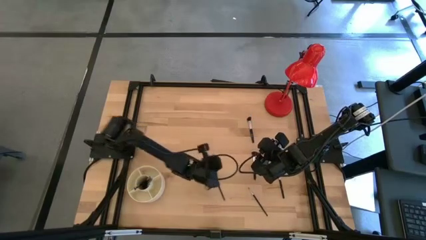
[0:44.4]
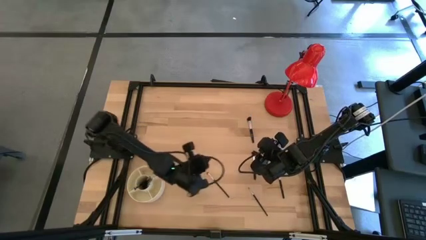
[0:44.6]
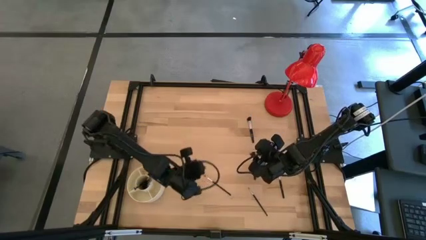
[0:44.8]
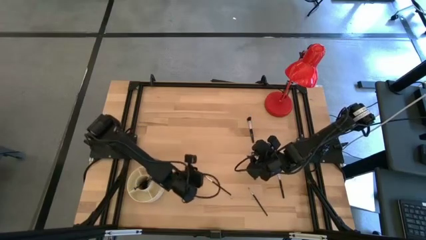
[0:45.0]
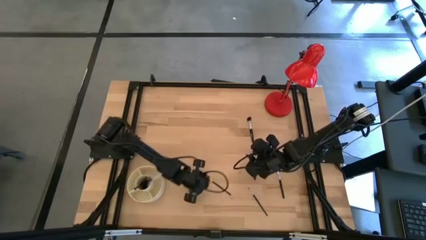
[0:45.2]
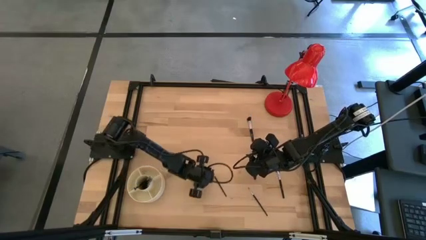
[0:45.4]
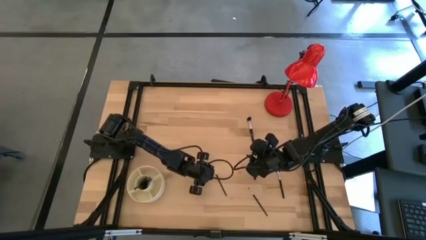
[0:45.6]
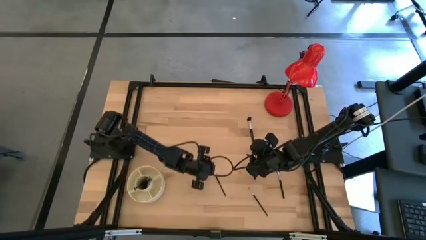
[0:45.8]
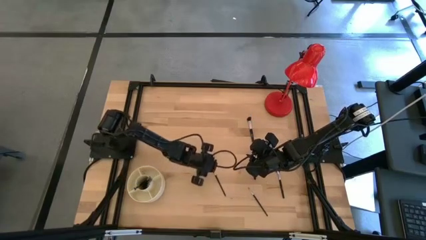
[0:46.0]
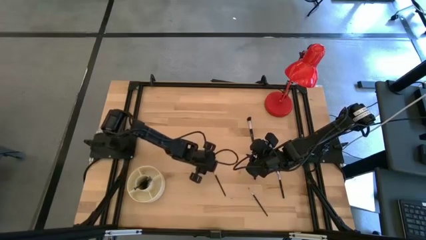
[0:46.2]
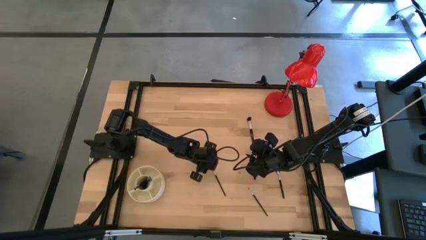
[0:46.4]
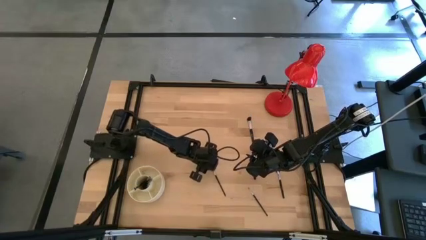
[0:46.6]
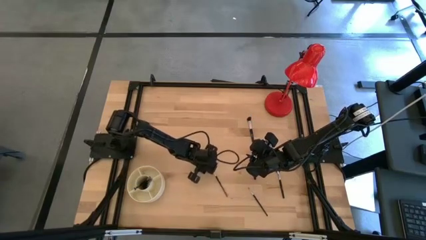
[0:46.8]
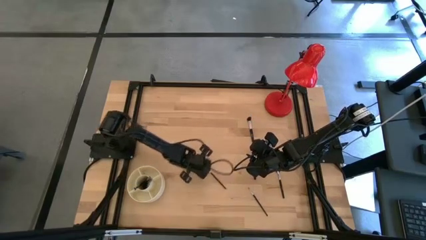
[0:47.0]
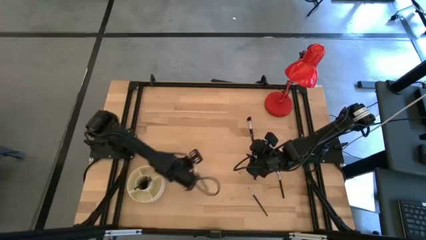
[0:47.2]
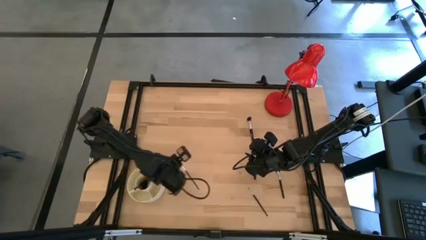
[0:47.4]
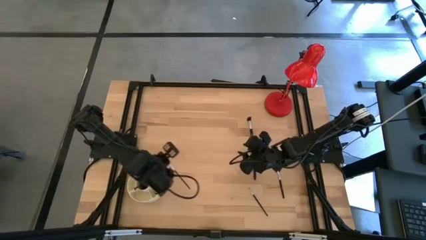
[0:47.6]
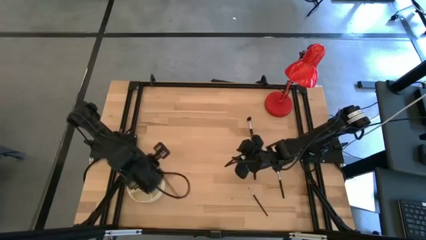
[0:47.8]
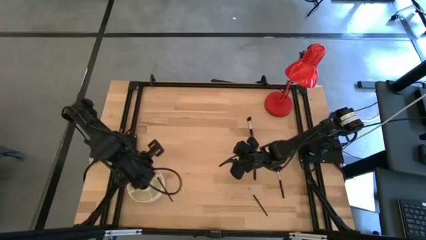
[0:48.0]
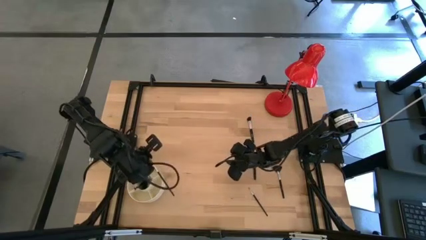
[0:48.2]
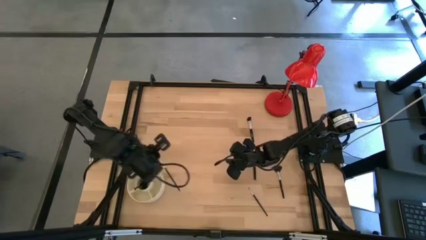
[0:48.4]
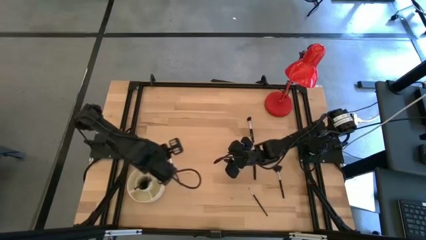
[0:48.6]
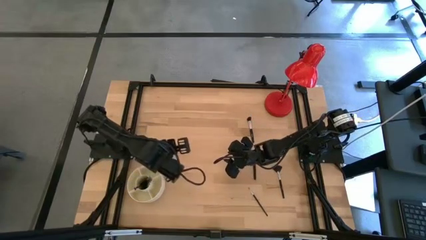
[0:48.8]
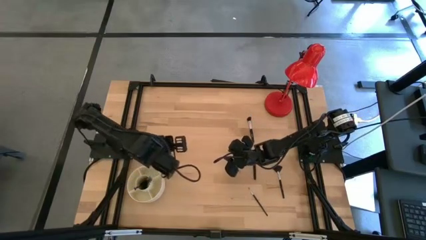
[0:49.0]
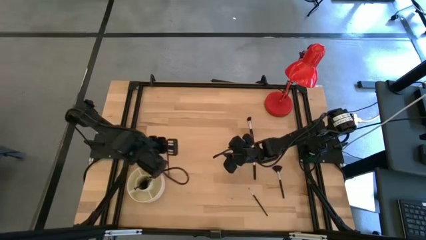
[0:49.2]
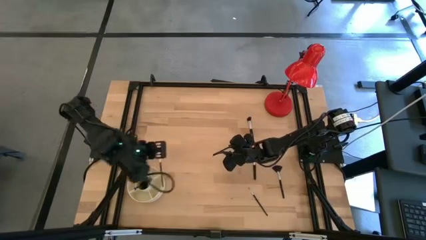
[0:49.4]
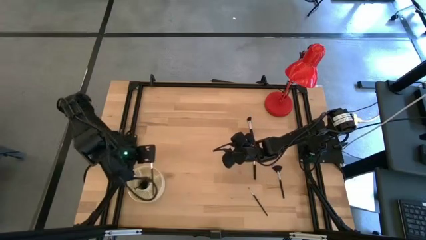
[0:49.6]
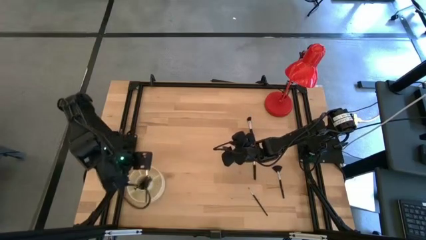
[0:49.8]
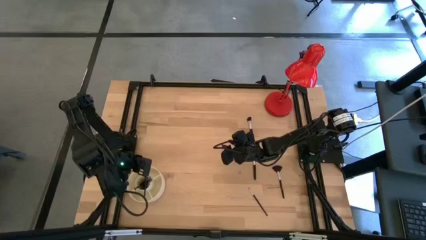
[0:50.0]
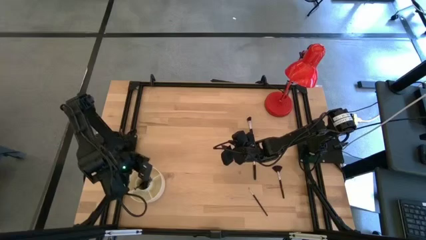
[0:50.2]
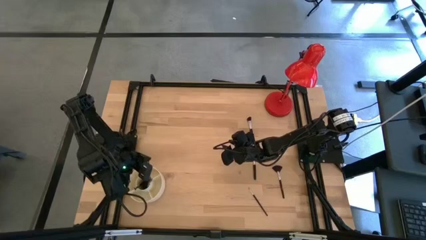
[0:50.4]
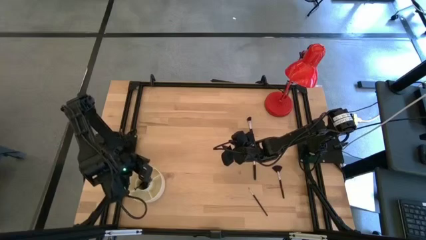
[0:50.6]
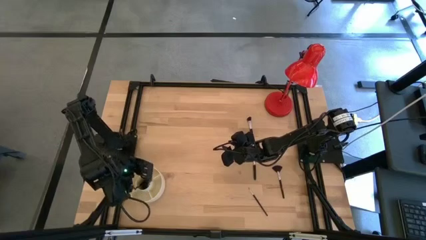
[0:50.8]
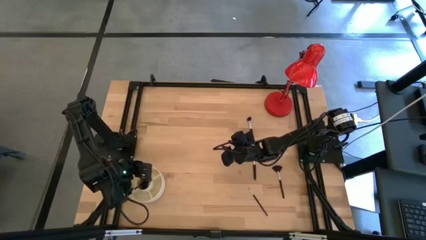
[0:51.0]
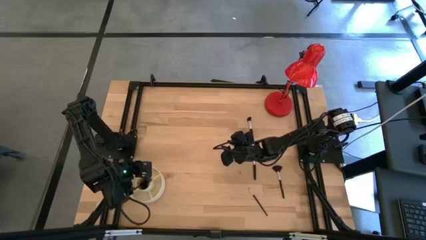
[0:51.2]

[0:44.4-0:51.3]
Task: Put items in baskets/containers
Put the black eyeshadow brush into the white organizer

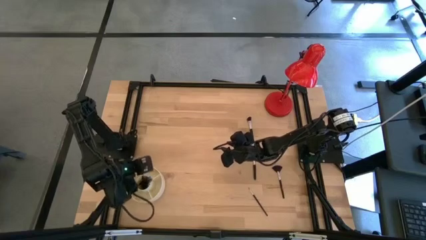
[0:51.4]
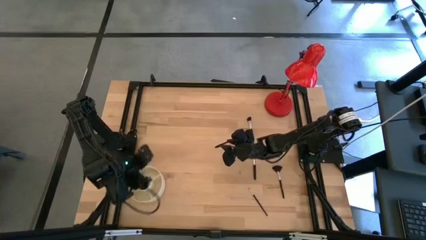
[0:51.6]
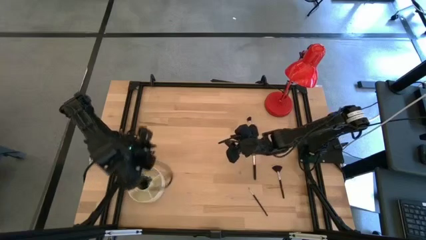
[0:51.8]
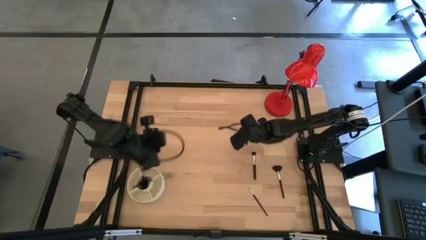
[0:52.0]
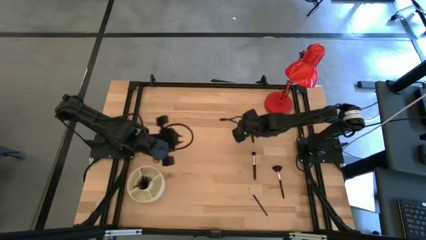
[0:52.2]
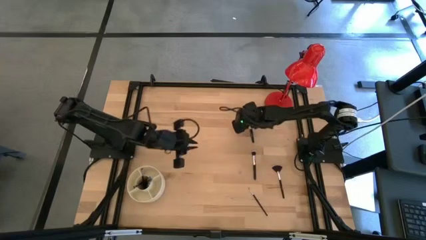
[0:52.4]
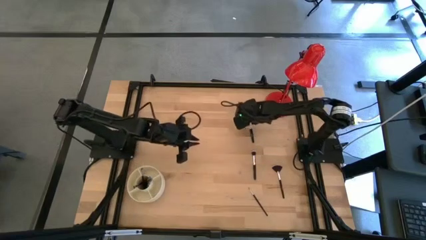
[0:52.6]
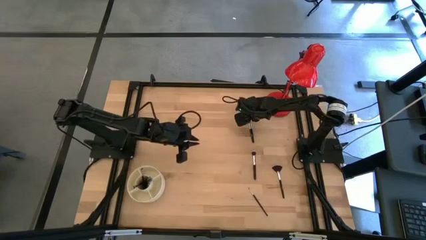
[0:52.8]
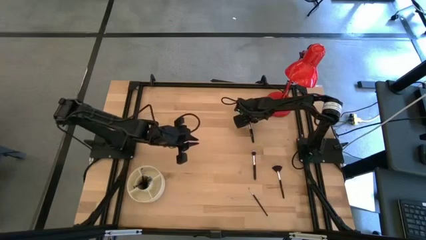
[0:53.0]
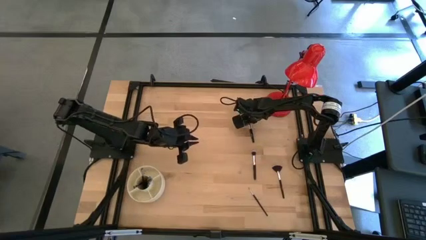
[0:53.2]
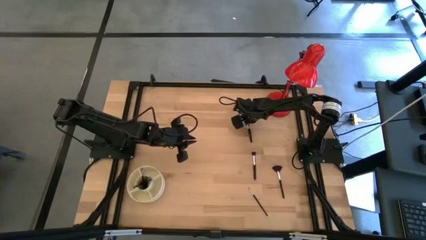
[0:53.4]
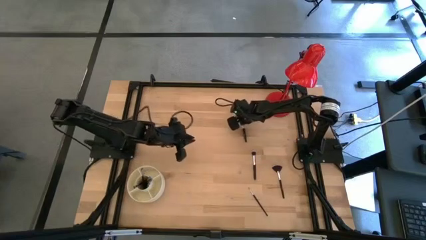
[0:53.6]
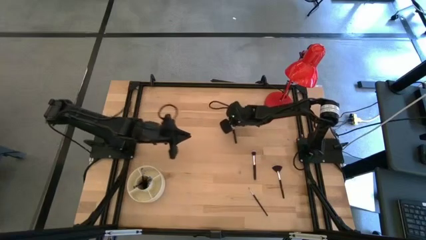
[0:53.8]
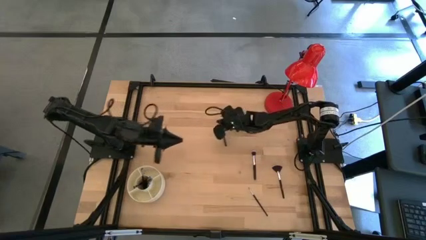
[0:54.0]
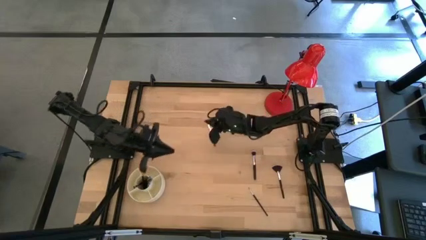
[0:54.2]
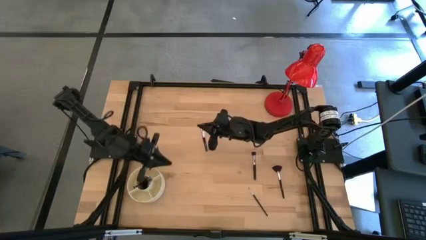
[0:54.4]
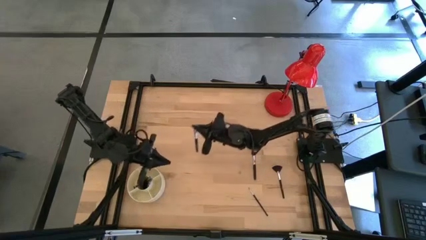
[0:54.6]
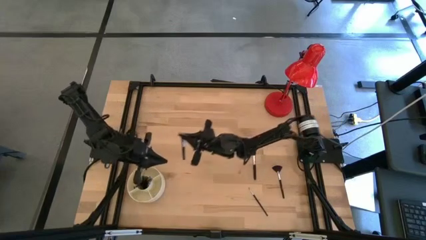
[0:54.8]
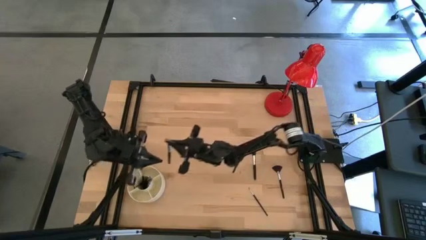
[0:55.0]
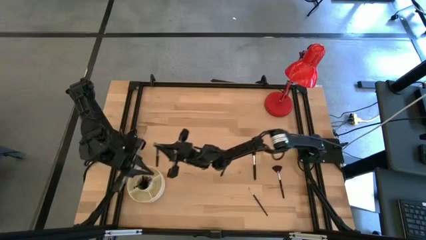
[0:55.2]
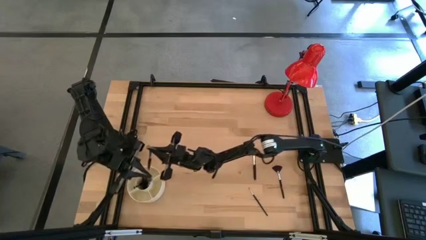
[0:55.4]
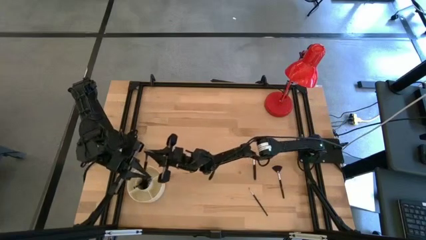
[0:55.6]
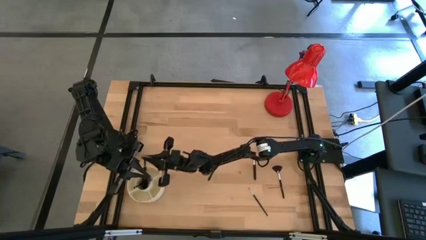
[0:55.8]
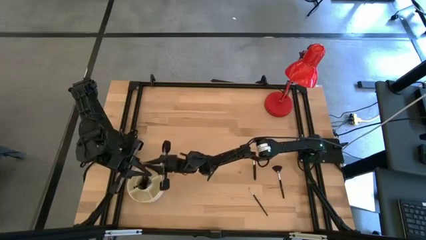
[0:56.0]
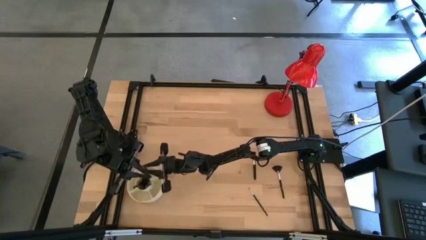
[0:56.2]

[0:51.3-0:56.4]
Put the black powder brush into the white organizer

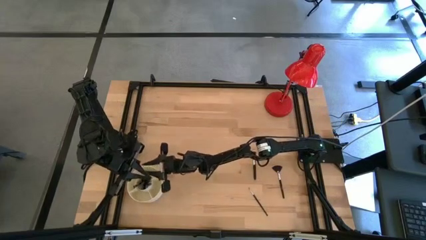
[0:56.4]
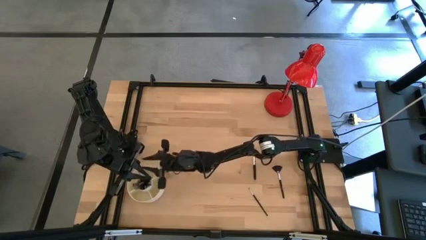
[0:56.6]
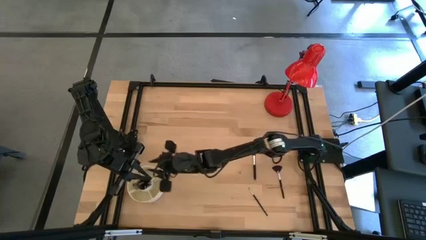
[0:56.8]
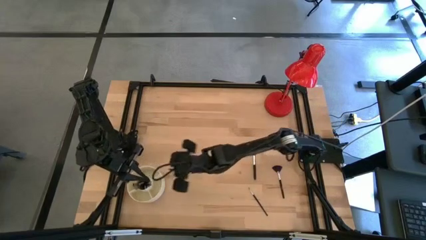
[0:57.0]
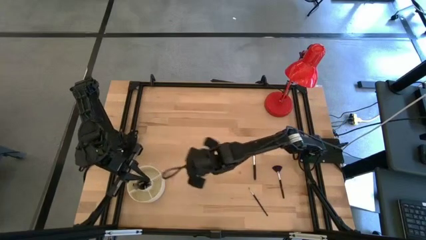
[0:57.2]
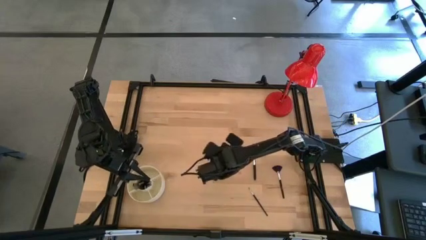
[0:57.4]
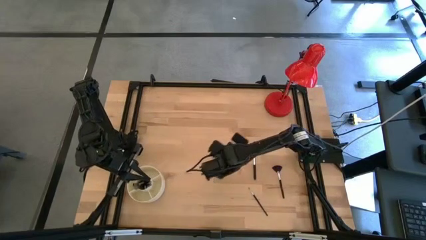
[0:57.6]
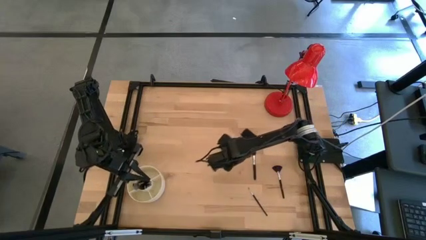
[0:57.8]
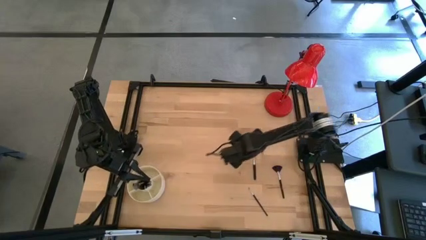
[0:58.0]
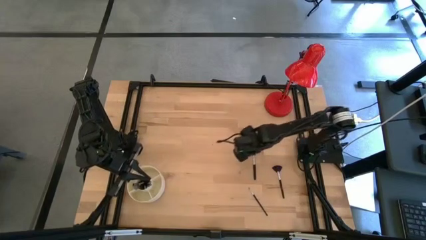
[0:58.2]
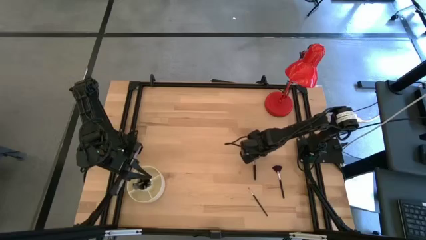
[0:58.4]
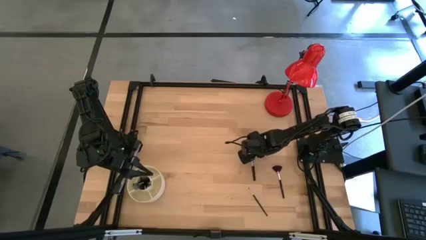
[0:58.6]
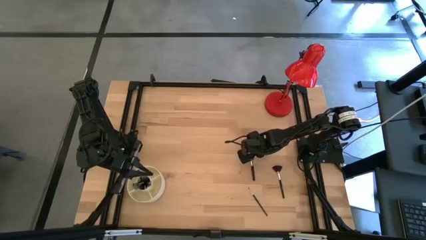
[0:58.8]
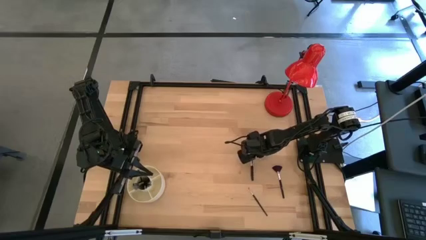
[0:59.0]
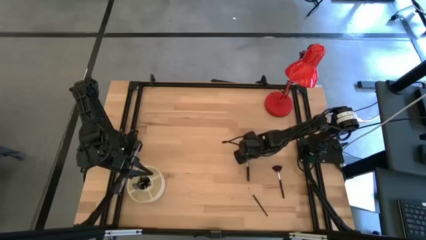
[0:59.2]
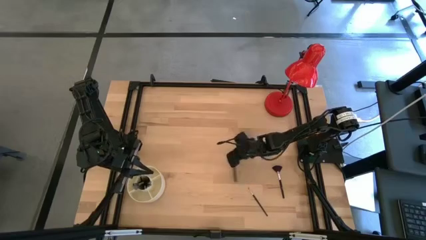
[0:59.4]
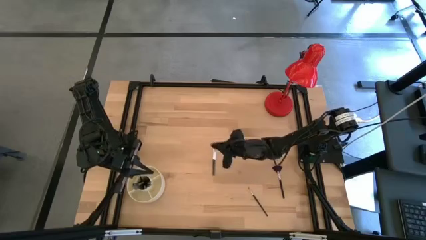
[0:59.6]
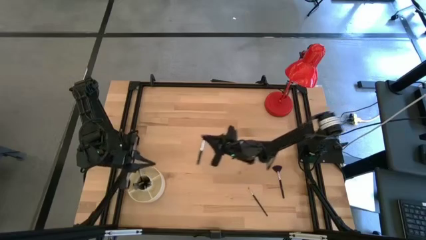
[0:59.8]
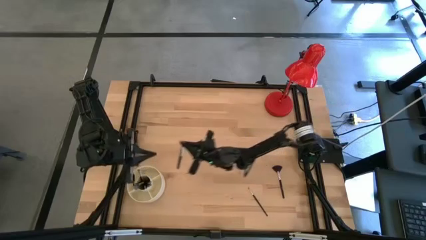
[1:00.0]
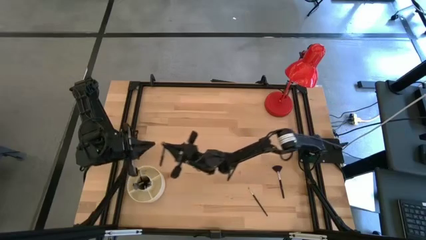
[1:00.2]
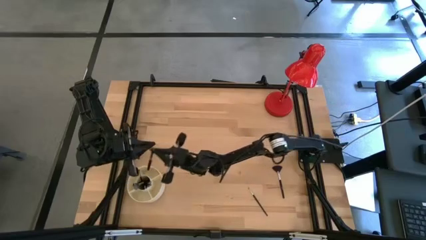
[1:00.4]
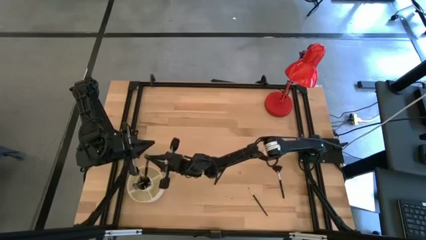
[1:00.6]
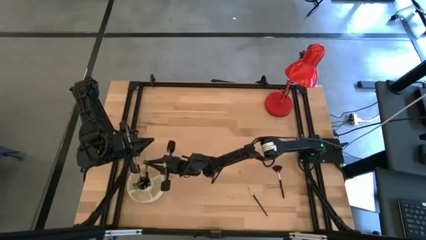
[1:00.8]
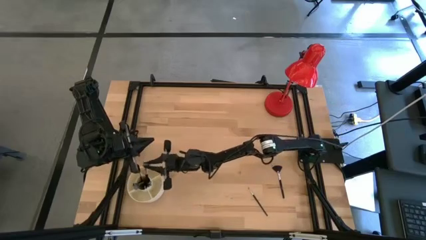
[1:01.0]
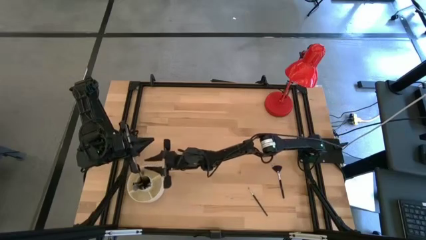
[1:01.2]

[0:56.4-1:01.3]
Put the black powder brush into the white organizer
